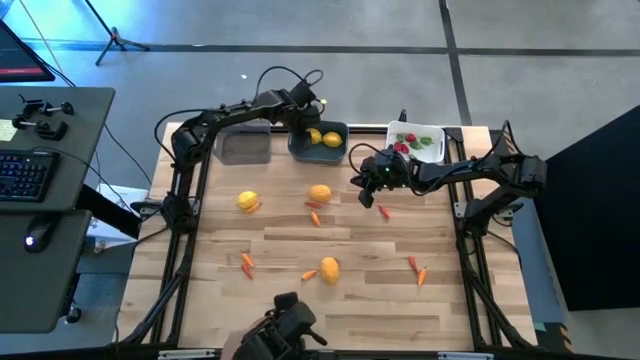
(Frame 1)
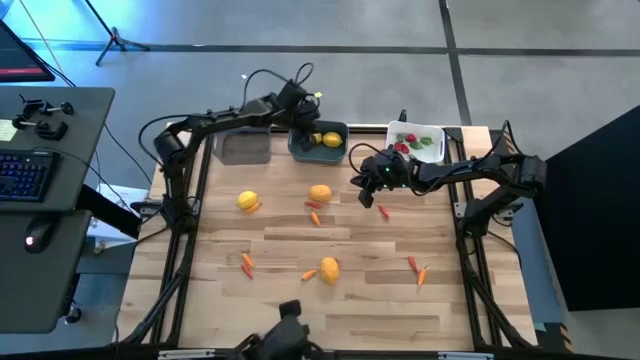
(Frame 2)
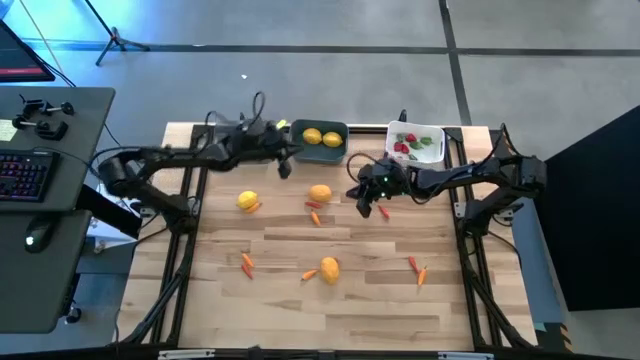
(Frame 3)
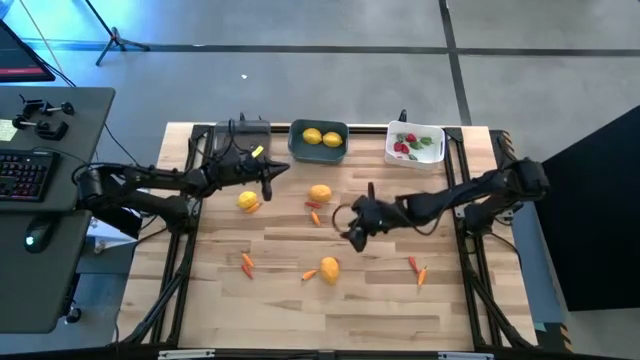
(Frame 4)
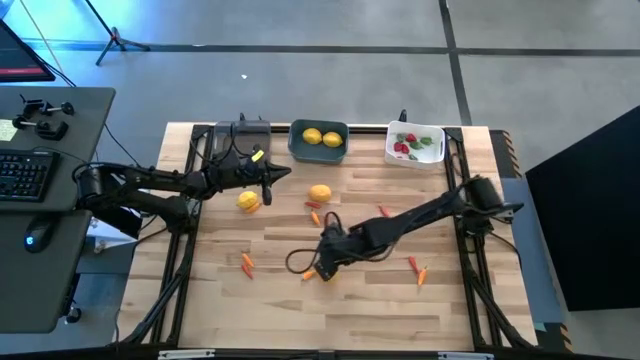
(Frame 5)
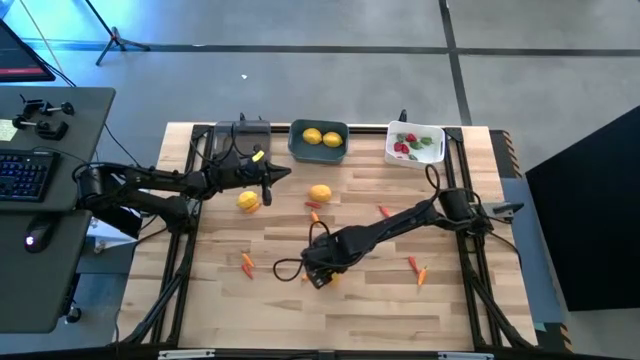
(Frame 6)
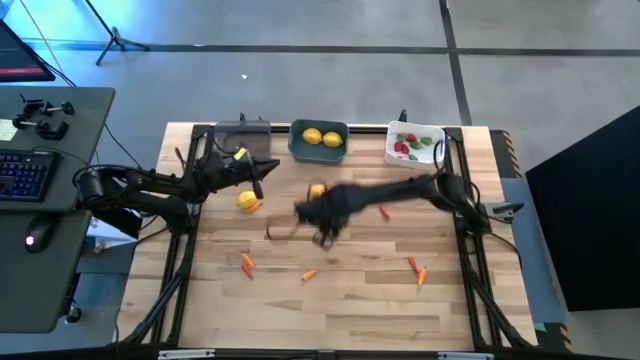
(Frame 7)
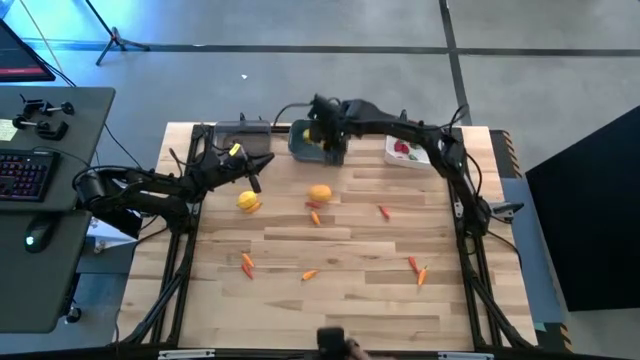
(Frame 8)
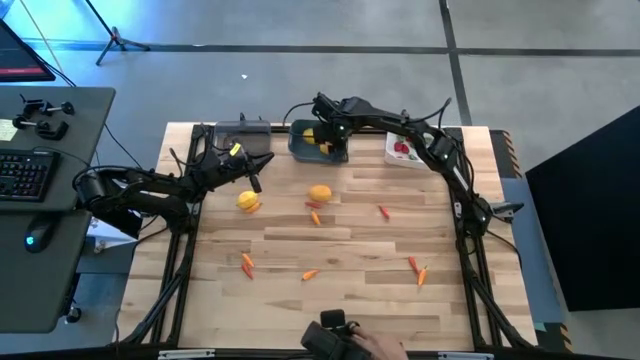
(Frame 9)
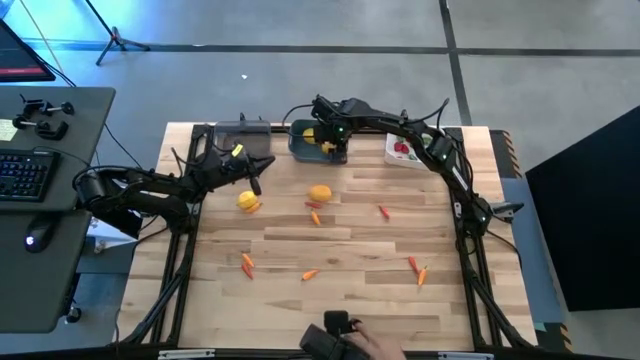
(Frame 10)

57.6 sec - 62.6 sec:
Task: Sort produce into baskets
Put the yellow lemon into the blue bin

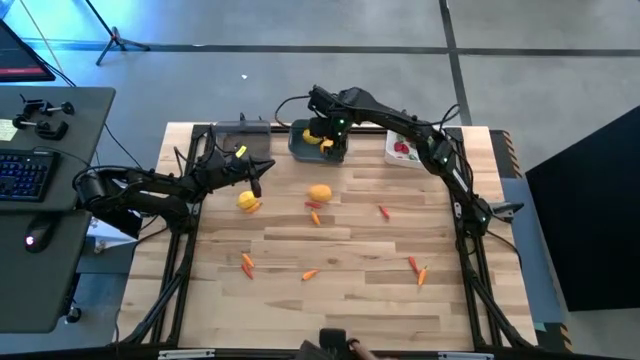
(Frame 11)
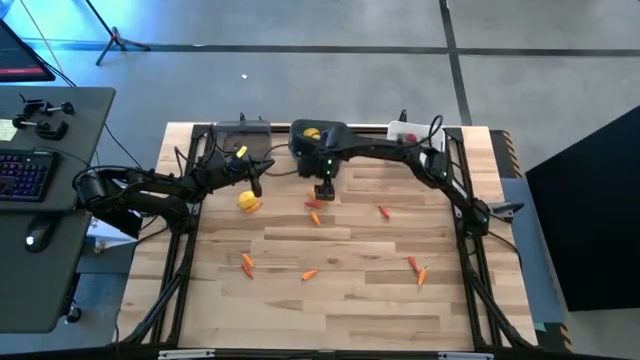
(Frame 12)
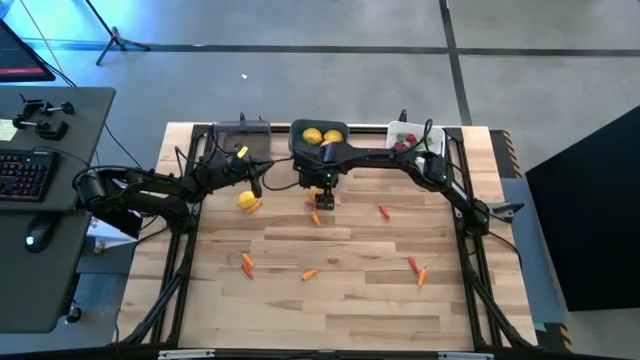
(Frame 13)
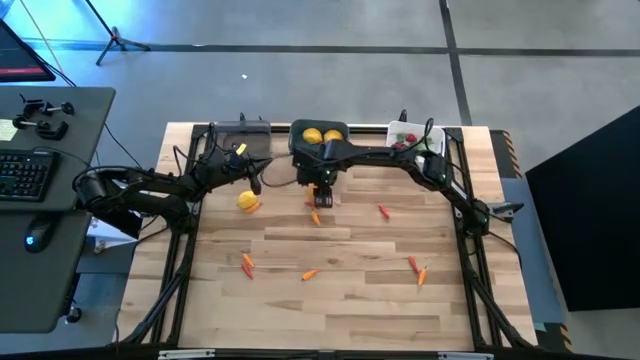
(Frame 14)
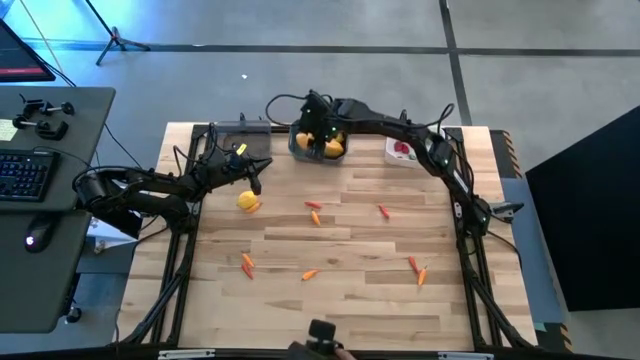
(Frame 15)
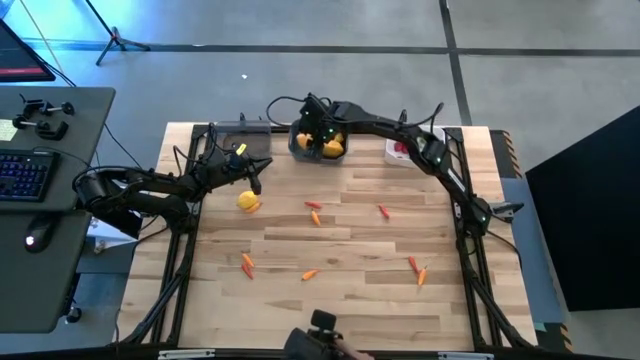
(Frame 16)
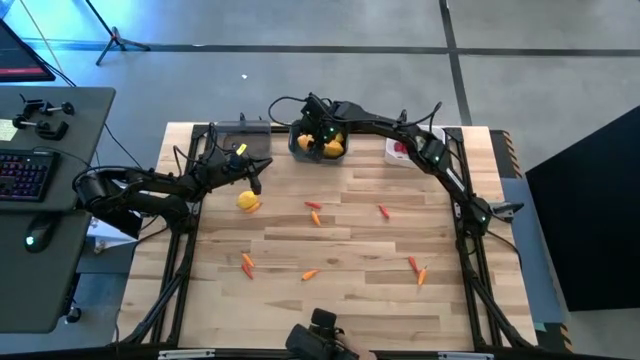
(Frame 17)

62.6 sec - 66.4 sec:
Put the yellow lemon into the blue bin

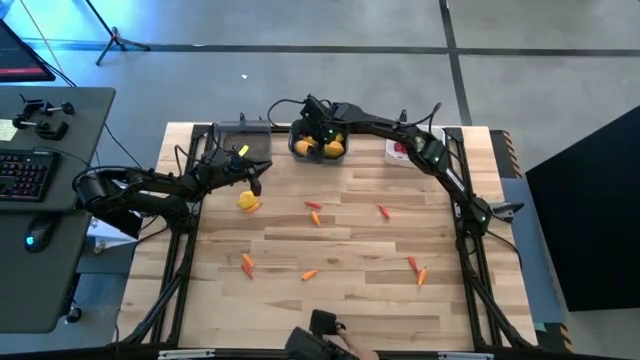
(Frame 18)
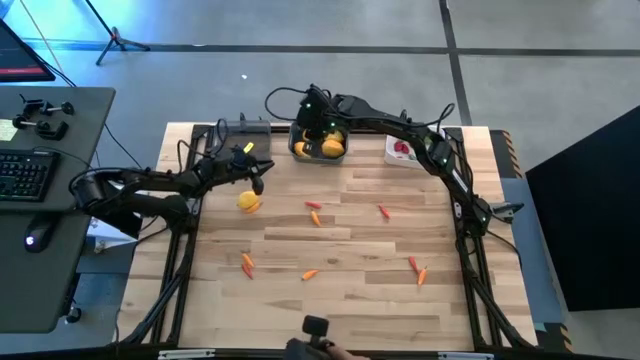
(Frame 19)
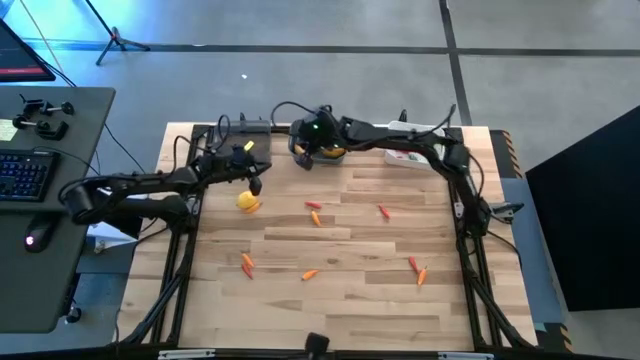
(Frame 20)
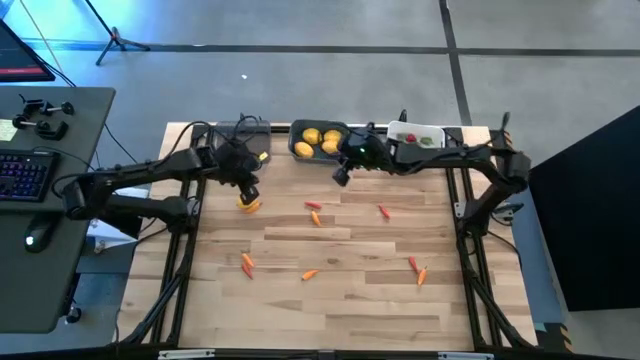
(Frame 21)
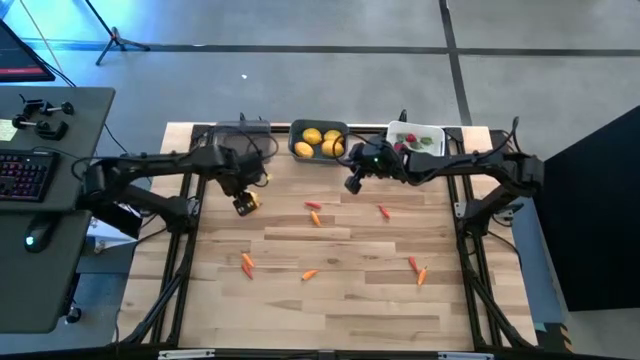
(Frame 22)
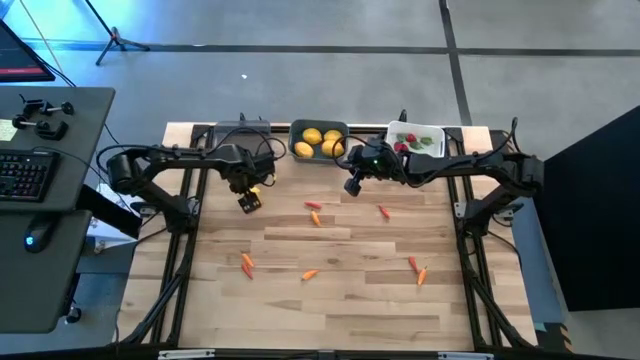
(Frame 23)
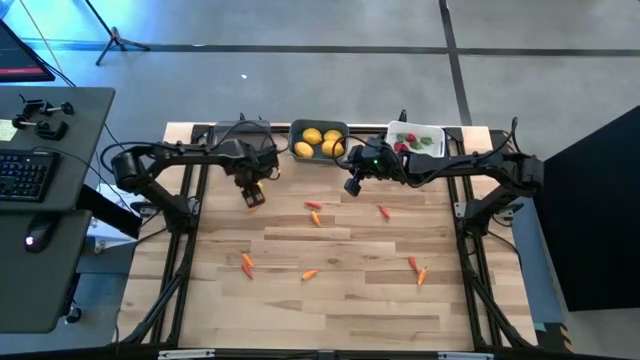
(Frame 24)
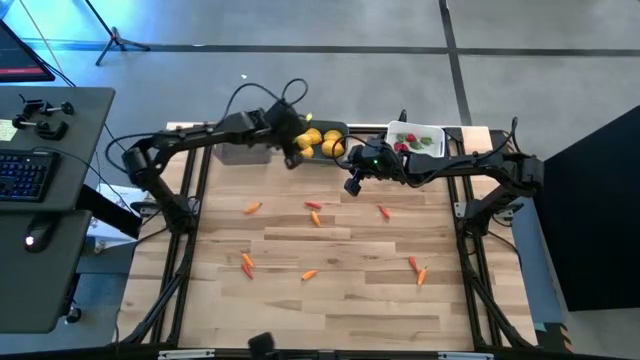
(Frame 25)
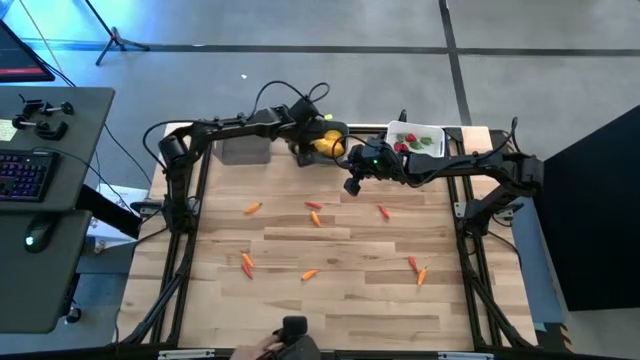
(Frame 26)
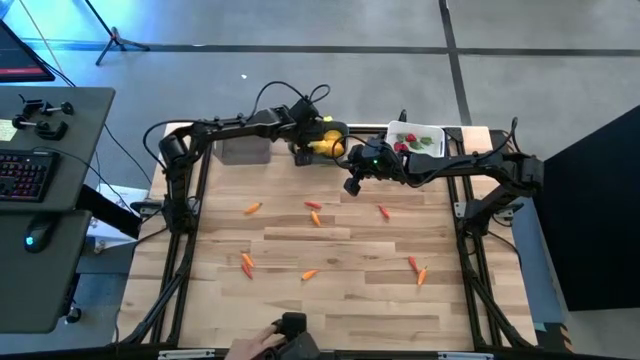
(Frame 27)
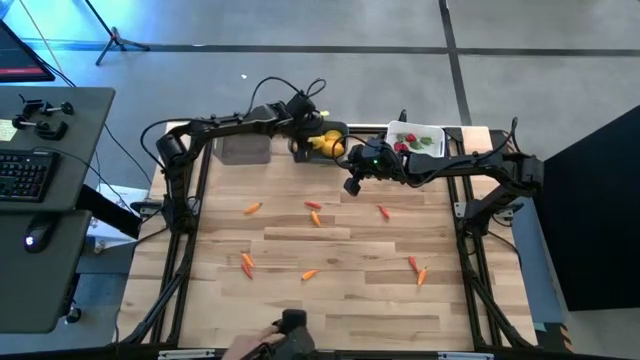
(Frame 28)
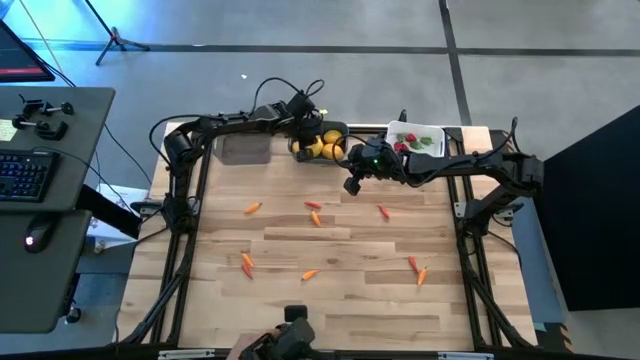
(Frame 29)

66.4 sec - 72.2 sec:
Put the yellow lemon into the blue bin

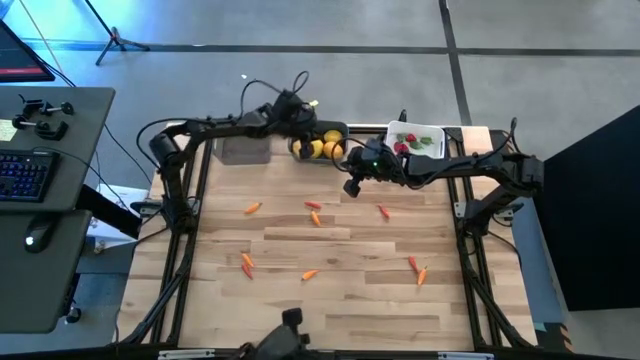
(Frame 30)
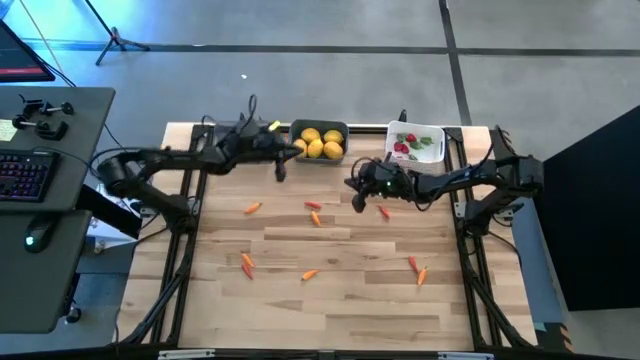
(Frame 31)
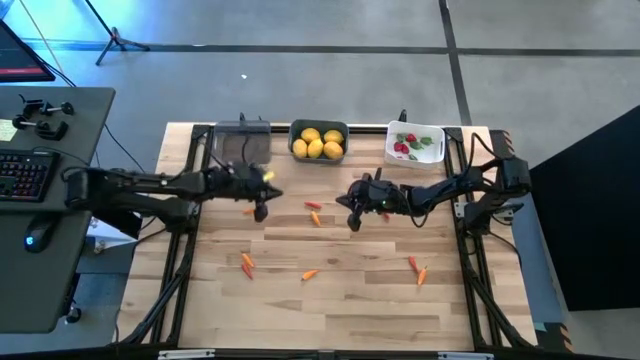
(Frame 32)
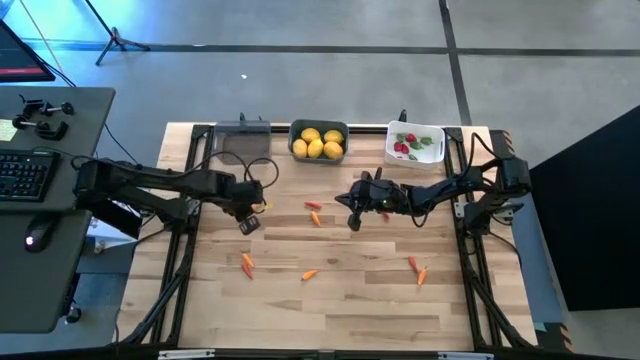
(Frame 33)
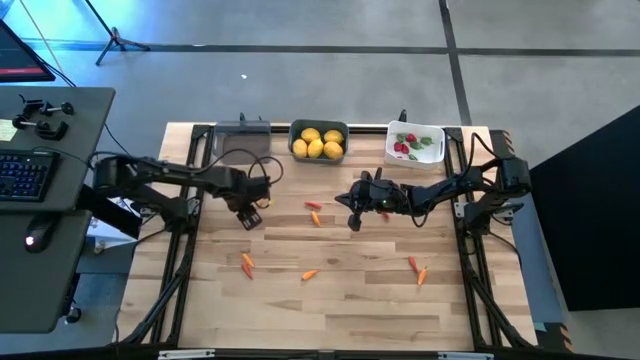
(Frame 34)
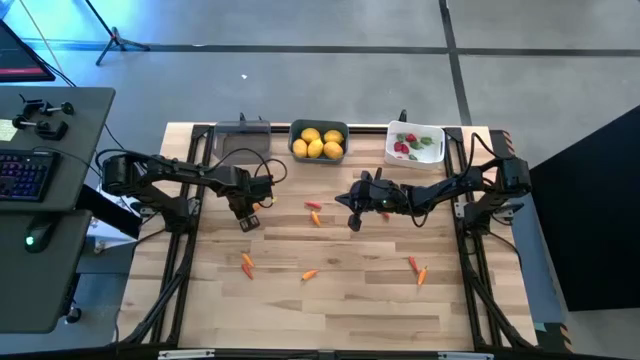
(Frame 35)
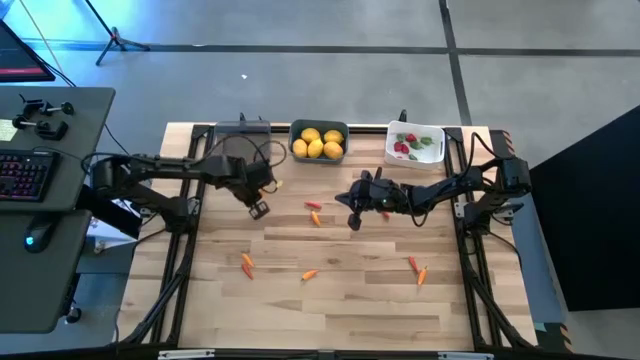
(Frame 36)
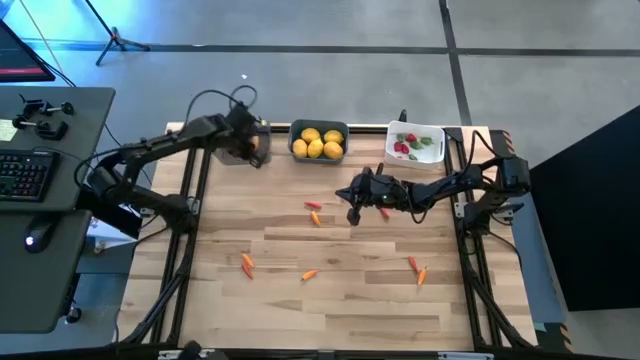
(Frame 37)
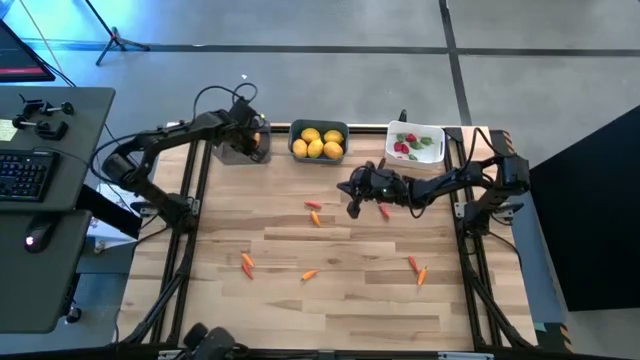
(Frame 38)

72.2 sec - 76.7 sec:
Put the yellow chili pepper into the transparent black bin

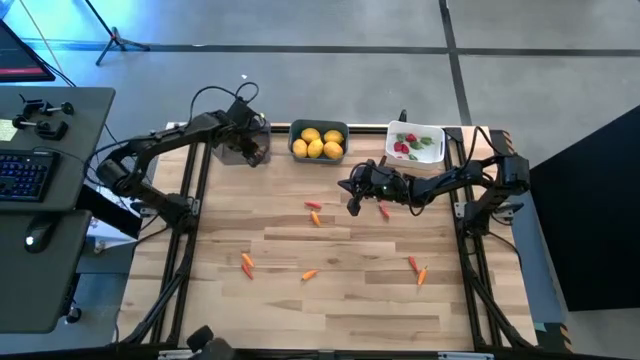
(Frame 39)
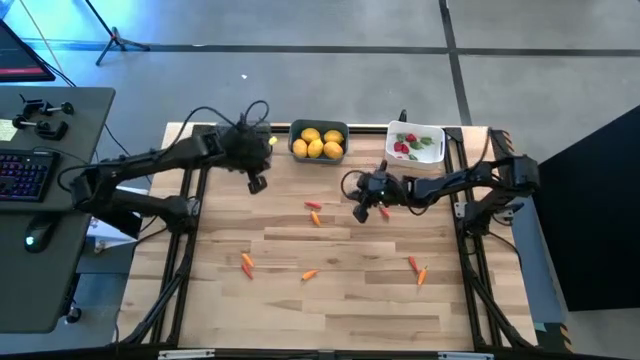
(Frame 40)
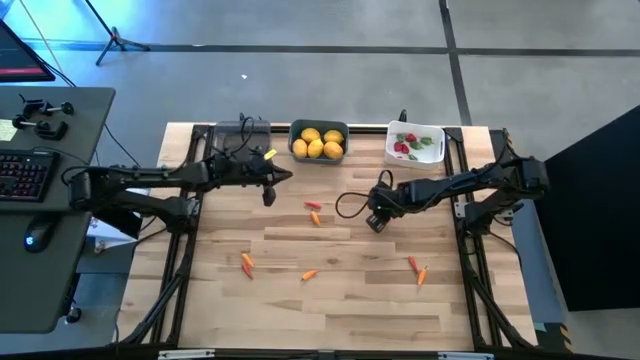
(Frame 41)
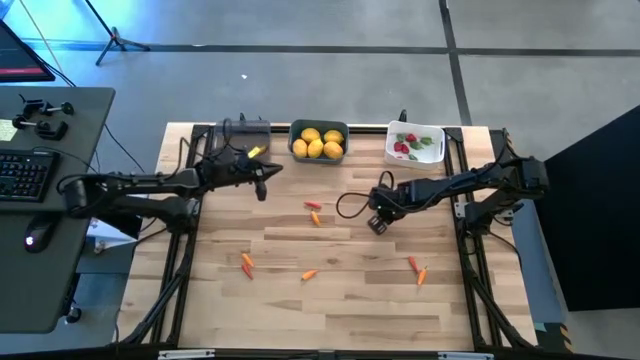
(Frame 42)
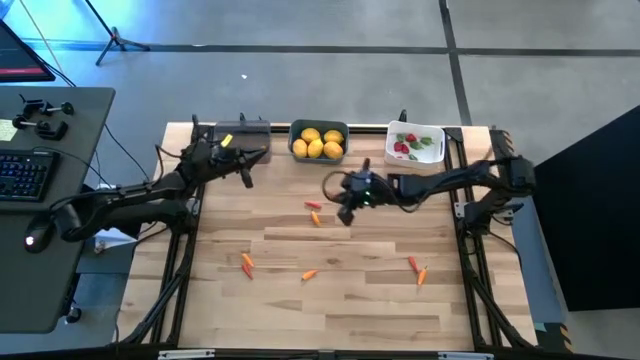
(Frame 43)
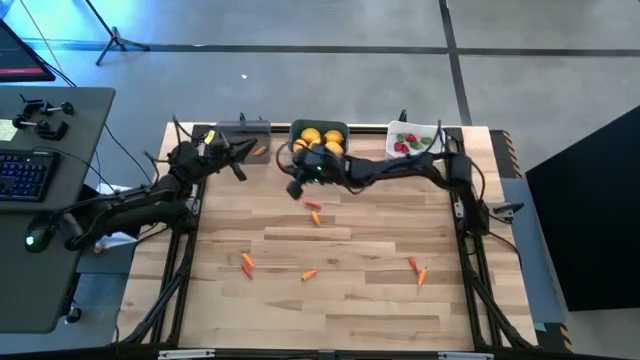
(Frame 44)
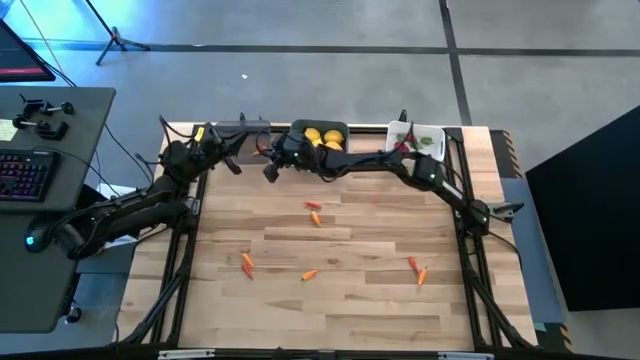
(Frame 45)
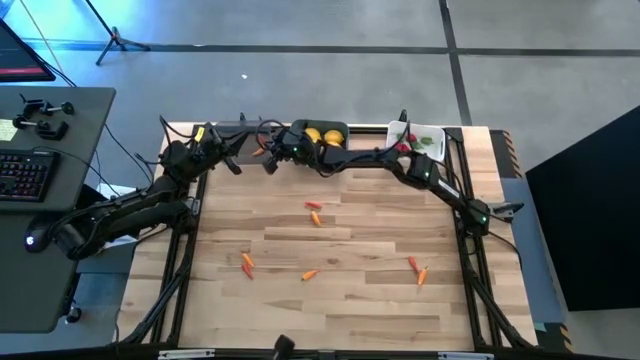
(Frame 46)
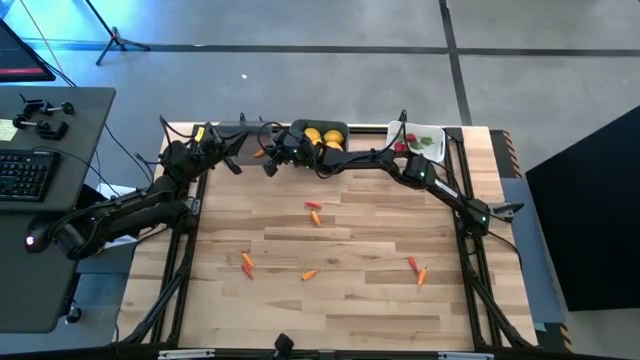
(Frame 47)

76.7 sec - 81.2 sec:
Put the orange chili pepper into the transparent black bin
